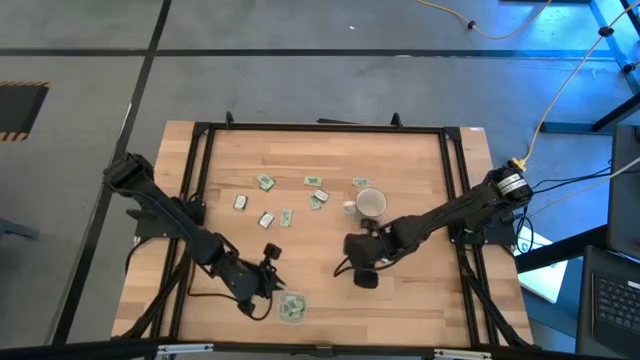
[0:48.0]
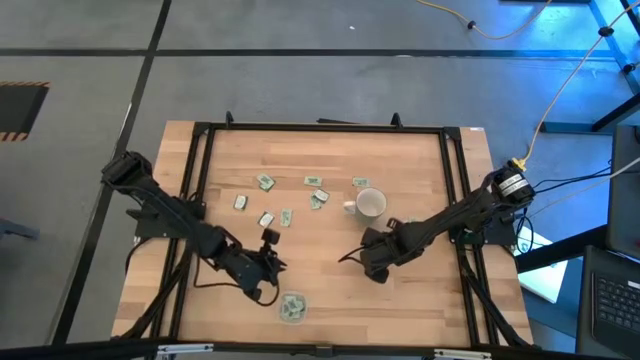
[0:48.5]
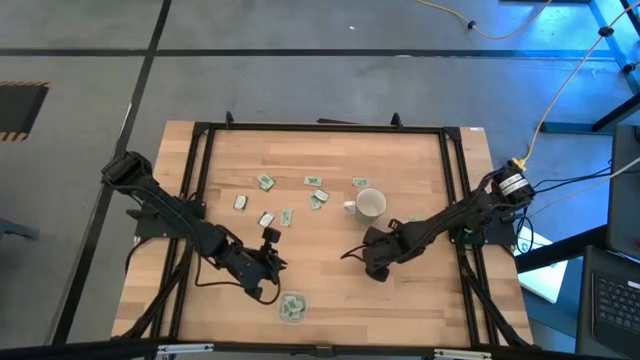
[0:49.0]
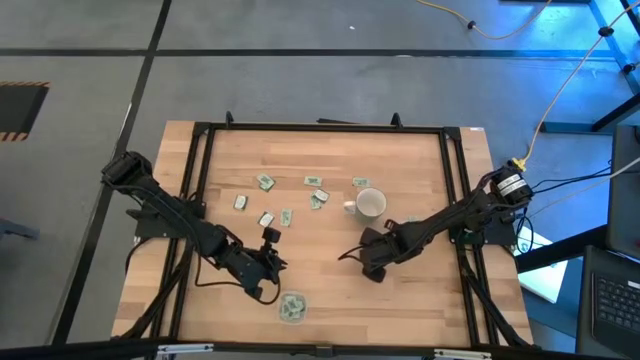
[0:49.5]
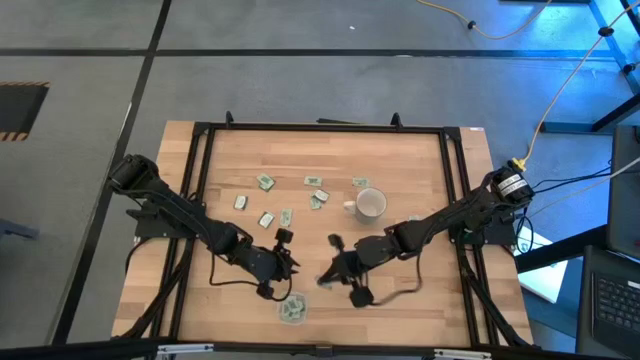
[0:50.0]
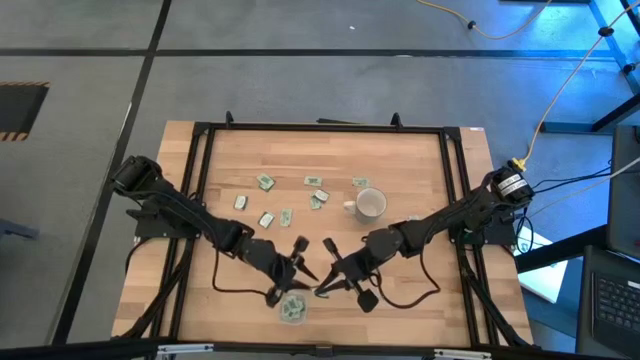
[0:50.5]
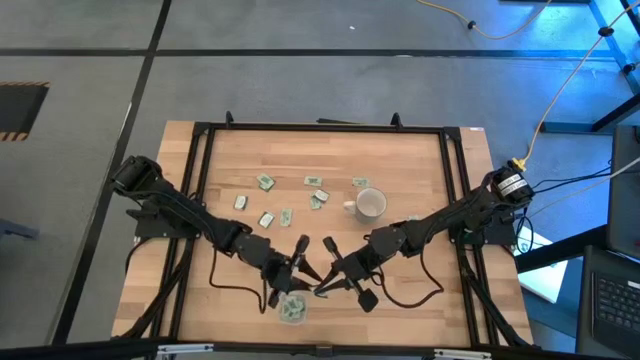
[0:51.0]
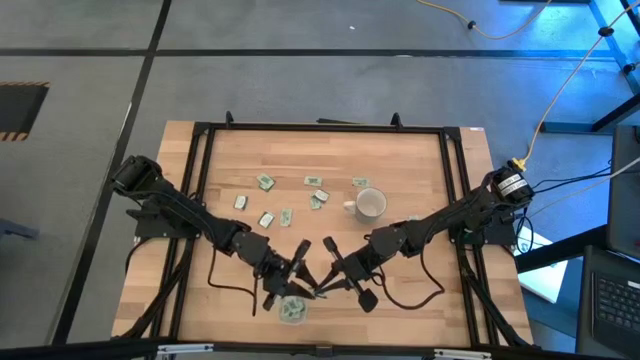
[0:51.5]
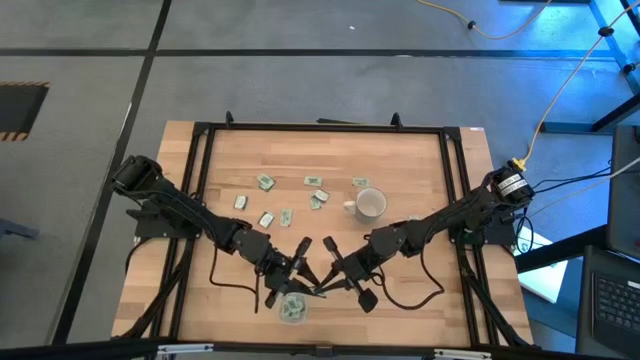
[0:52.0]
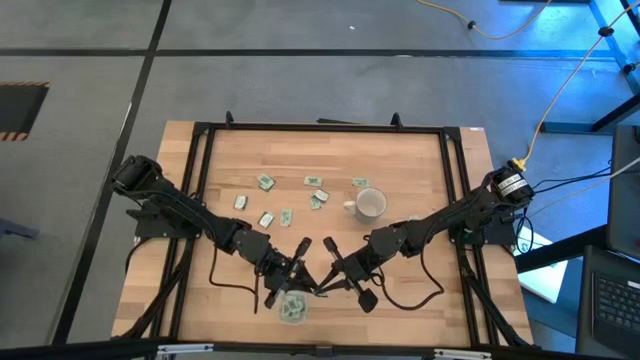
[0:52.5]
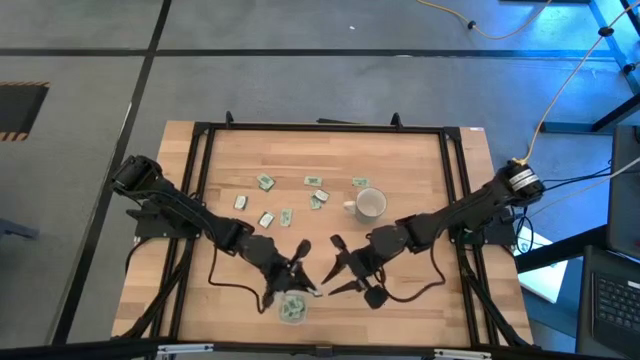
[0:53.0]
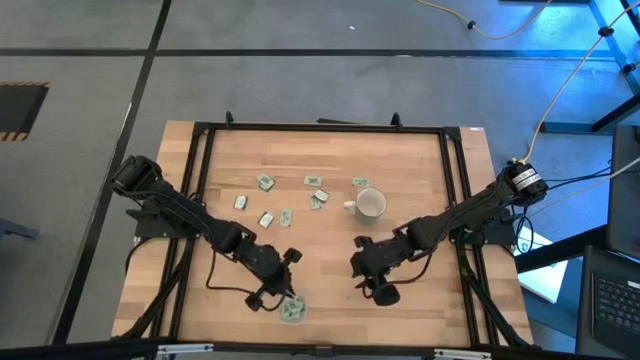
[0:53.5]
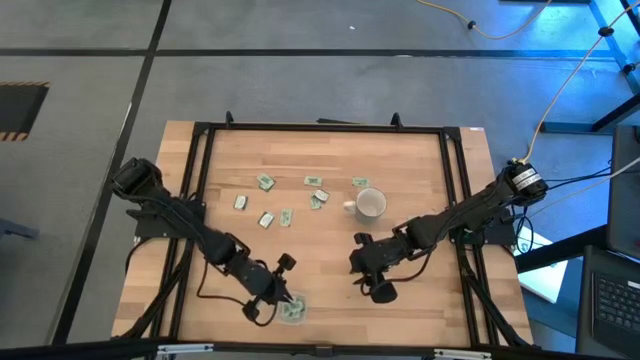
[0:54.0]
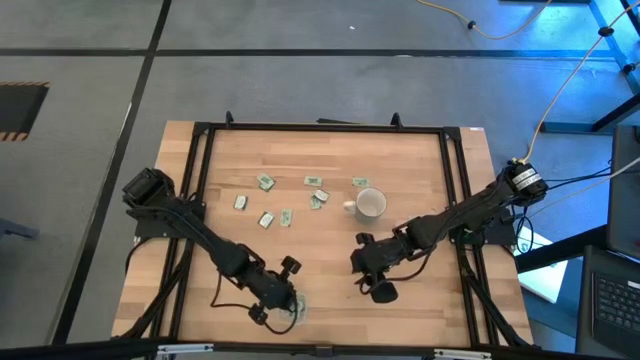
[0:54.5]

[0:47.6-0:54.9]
Task: Pick and place Stevia / Truvia into bins
Put the green stevia packet into the transparent bin

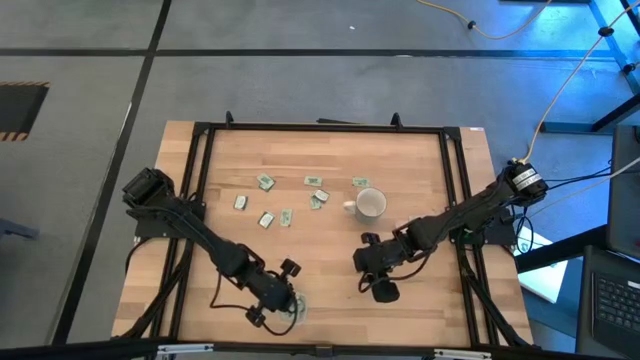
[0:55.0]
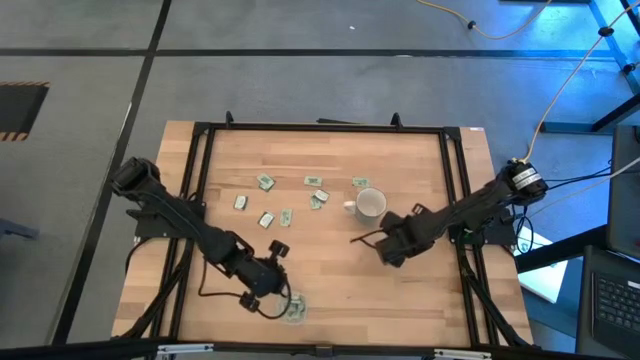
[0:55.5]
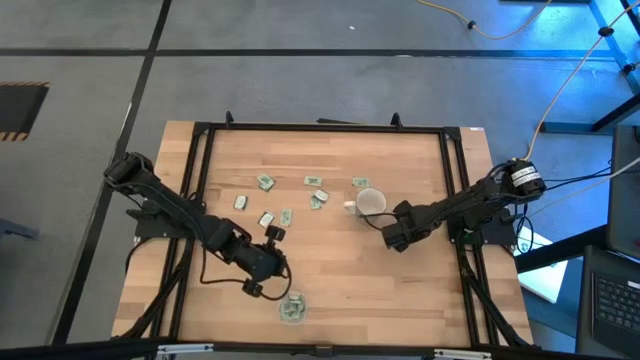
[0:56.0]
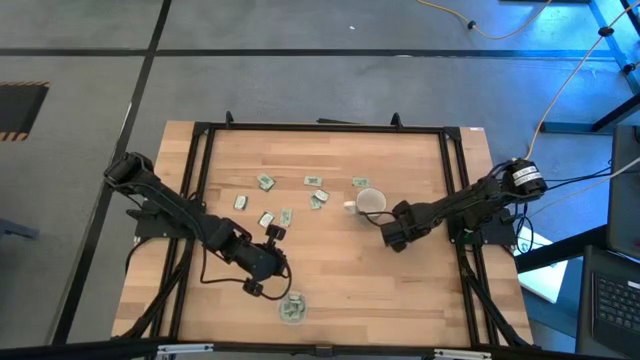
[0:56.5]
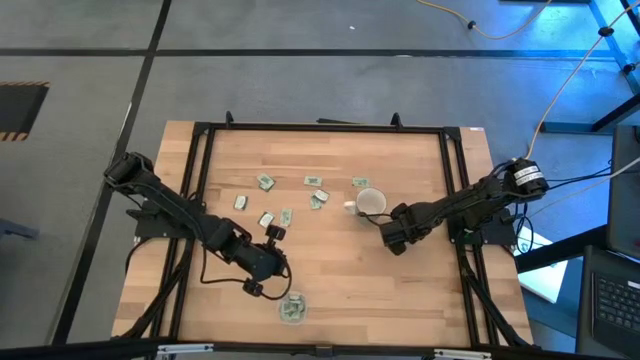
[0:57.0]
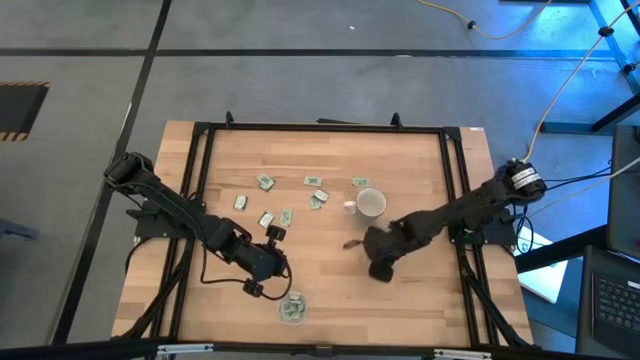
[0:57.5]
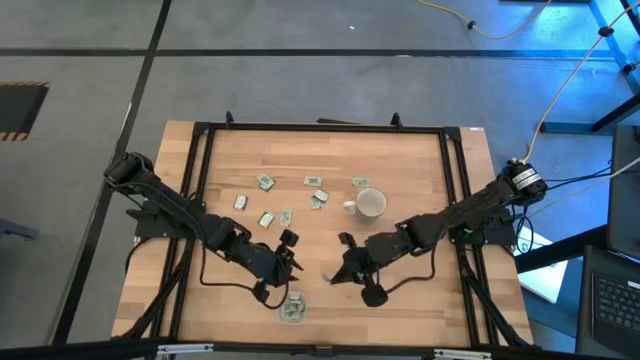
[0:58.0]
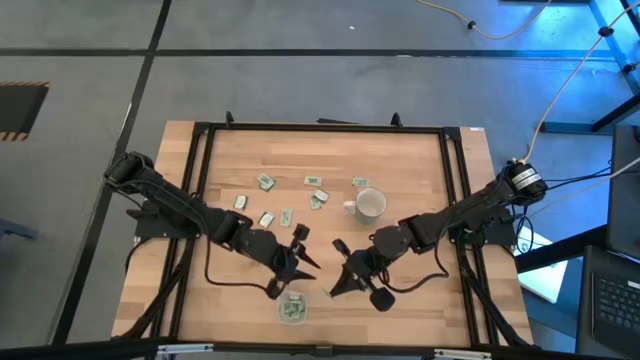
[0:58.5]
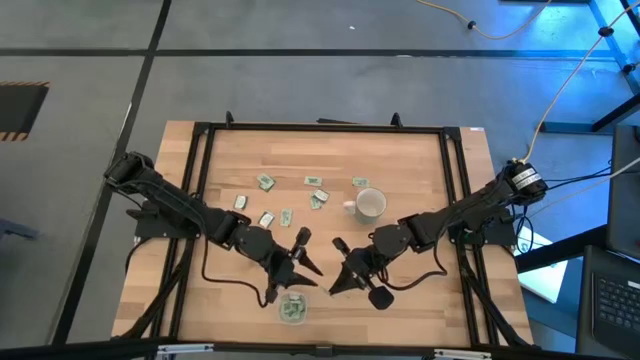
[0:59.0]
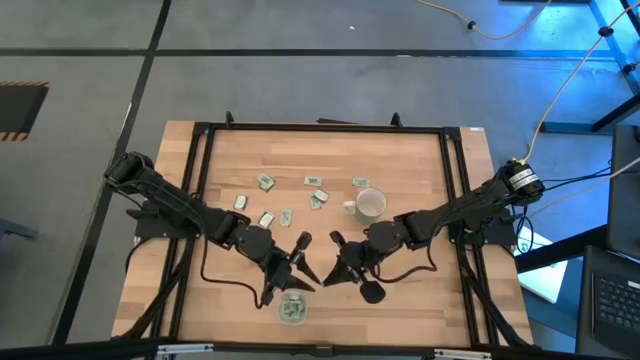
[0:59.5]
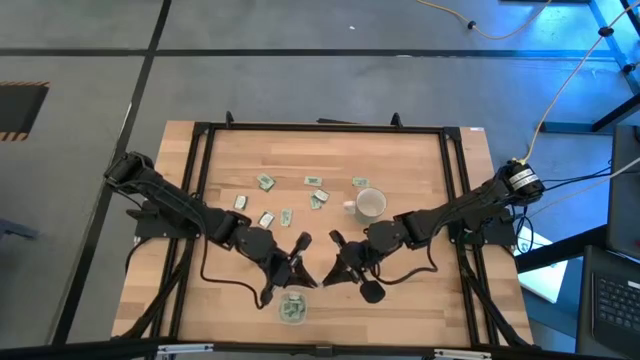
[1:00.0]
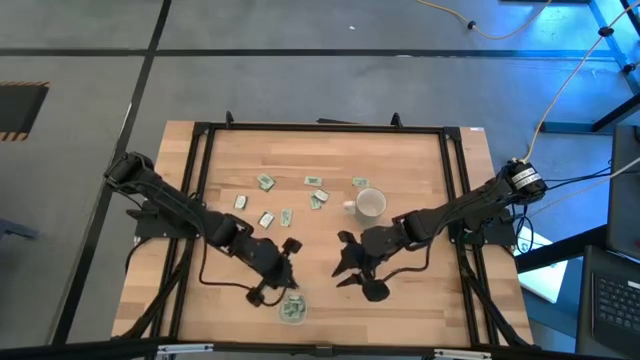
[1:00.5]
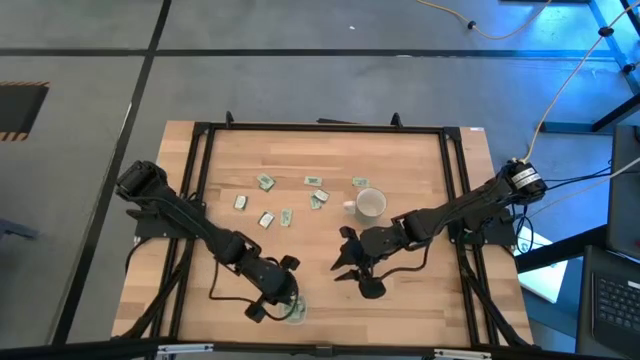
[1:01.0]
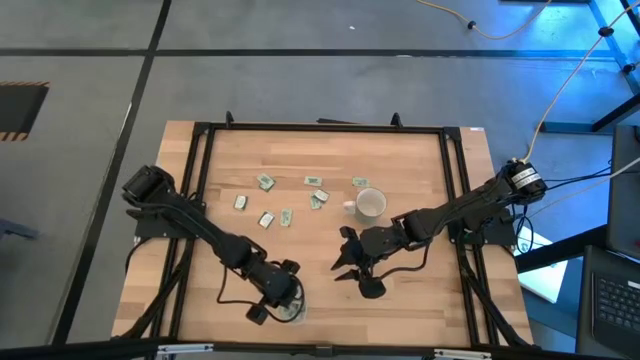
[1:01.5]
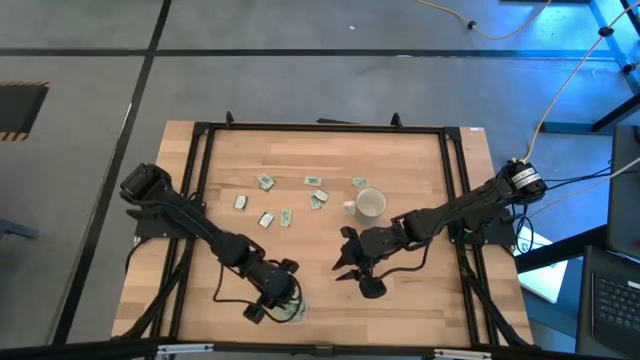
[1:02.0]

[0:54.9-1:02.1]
Put the light green stevia packet into the transparent bin

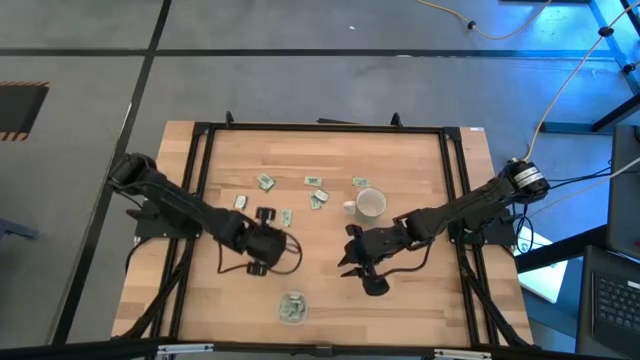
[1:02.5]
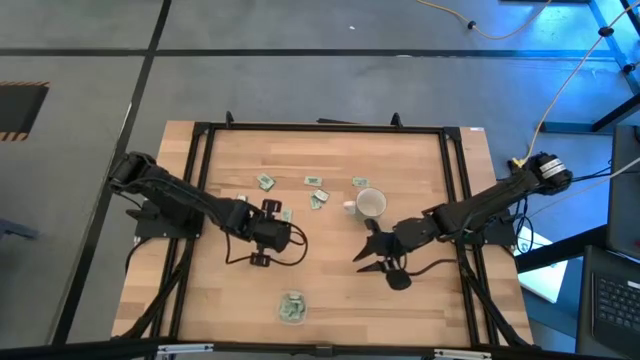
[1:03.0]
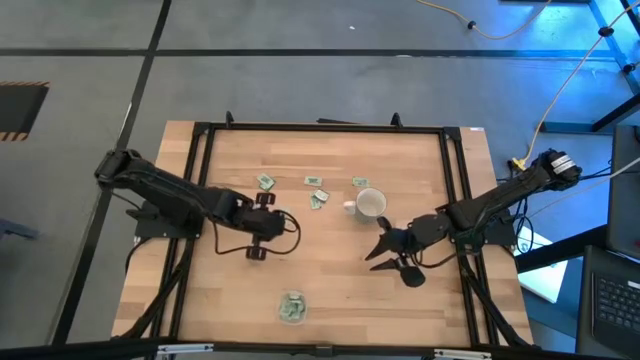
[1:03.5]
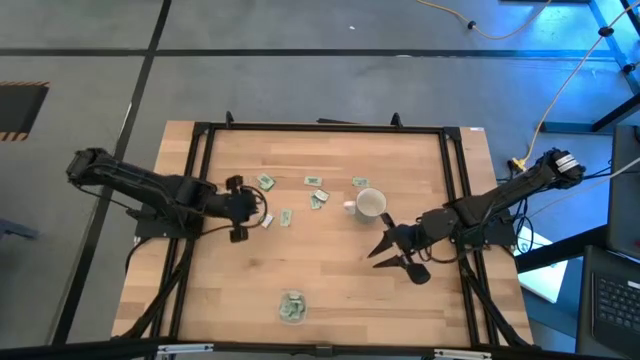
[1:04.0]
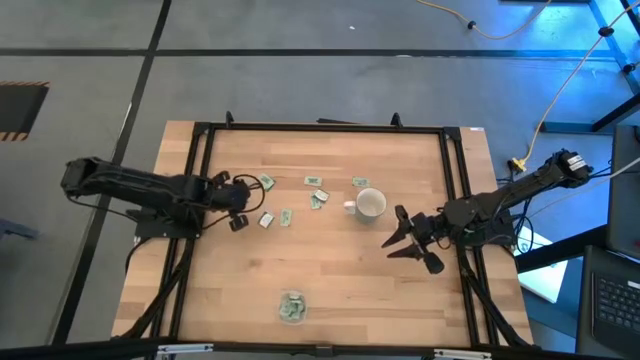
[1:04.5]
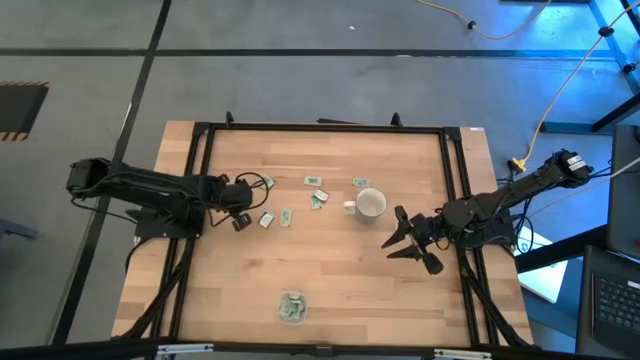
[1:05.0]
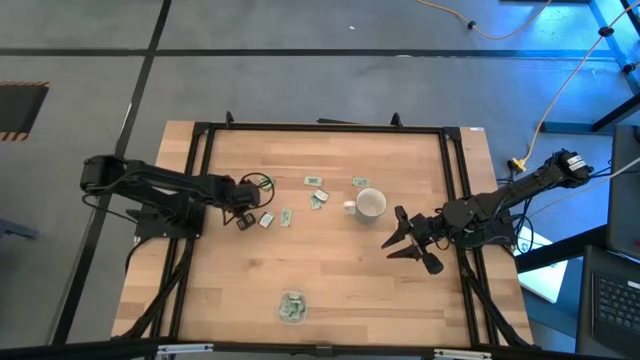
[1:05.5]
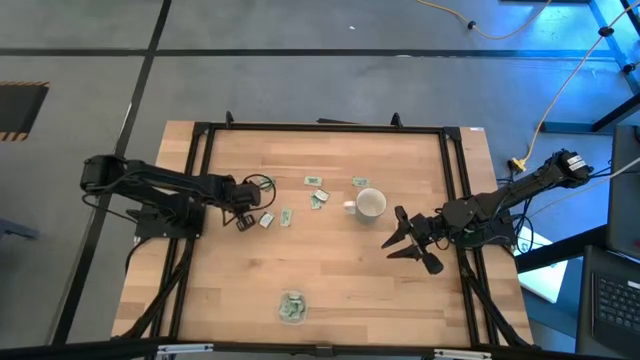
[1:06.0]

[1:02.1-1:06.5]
Put the green stevia packet into the transparent bin

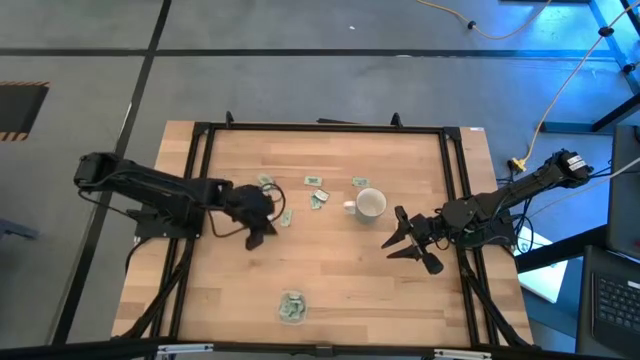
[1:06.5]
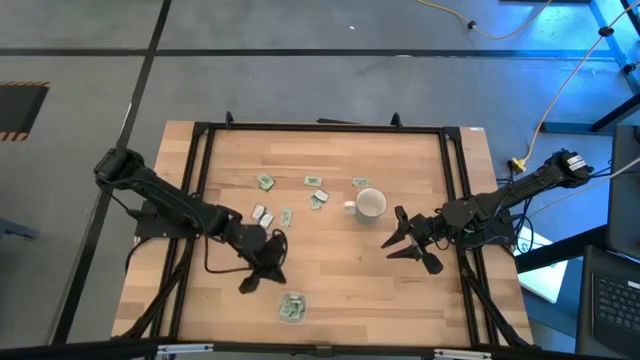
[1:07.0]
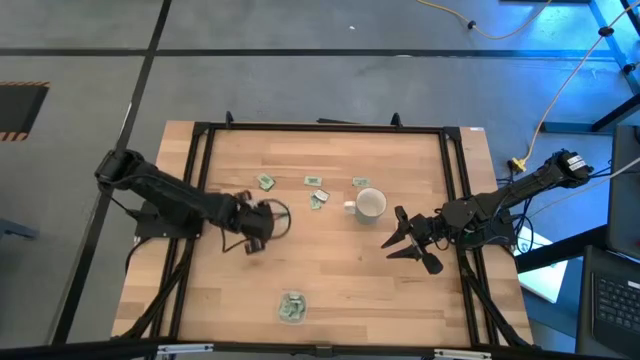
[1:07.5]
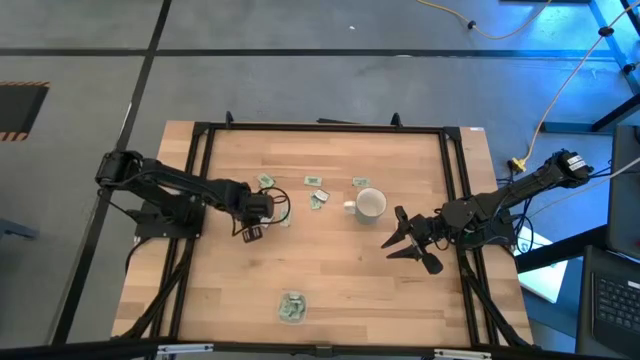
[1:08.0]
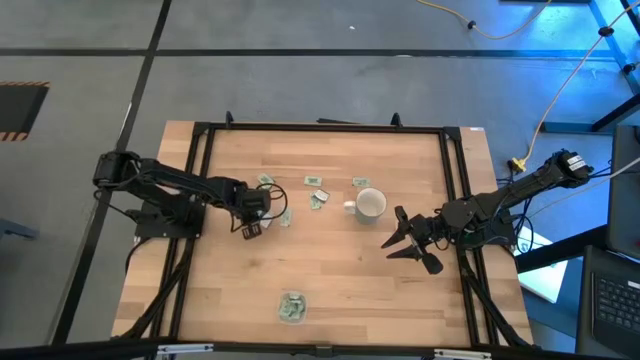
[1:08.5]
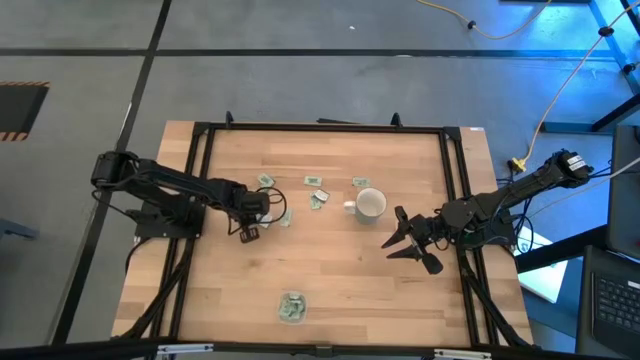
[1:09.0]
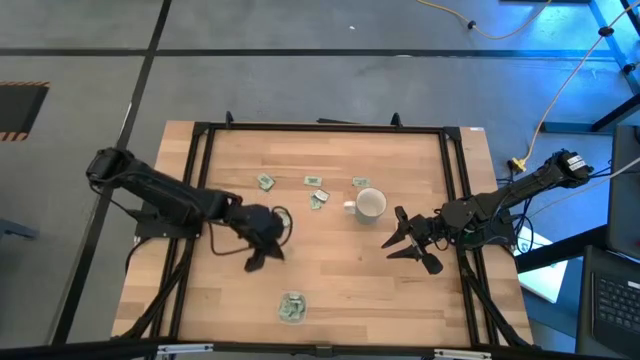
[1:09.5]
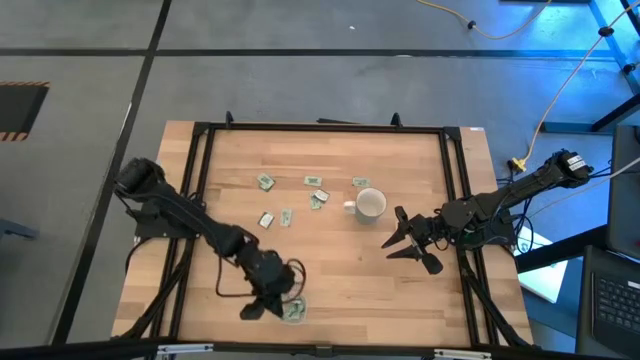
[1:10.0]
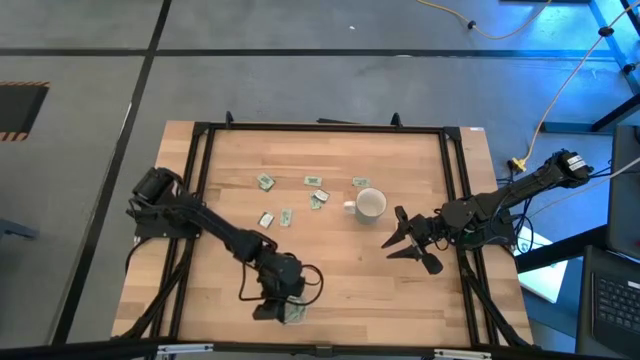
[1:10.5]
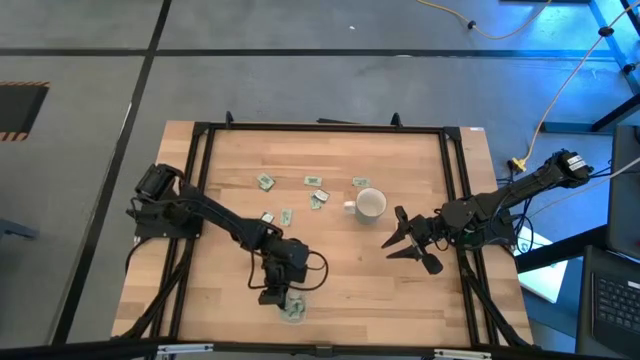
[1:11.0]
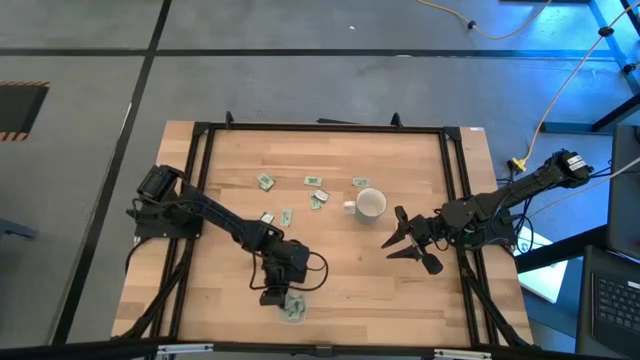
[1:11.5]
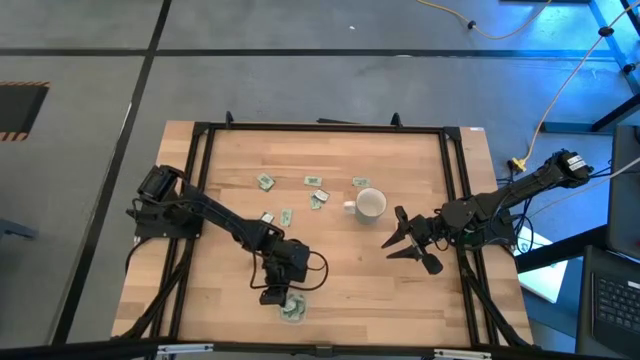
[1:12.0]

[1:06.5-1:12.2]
Put the green stevia packet into the transparent bin
